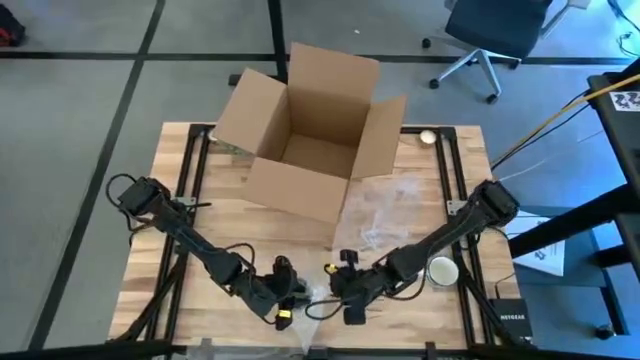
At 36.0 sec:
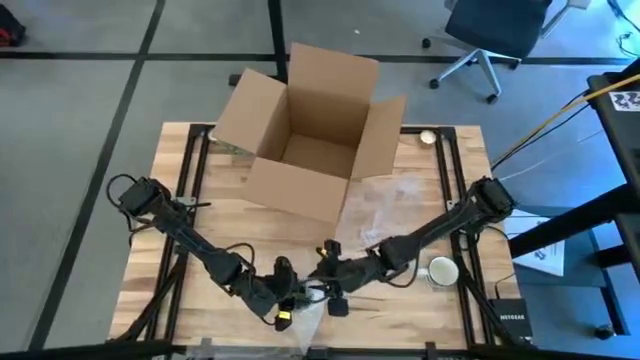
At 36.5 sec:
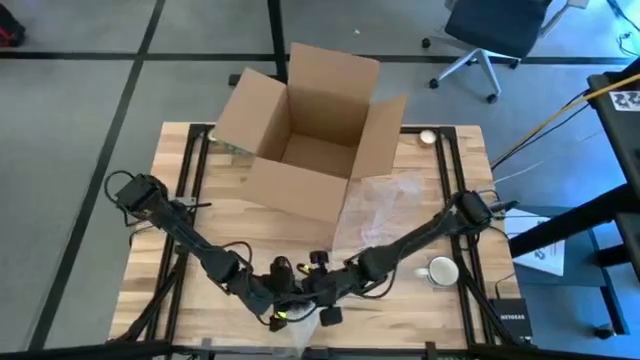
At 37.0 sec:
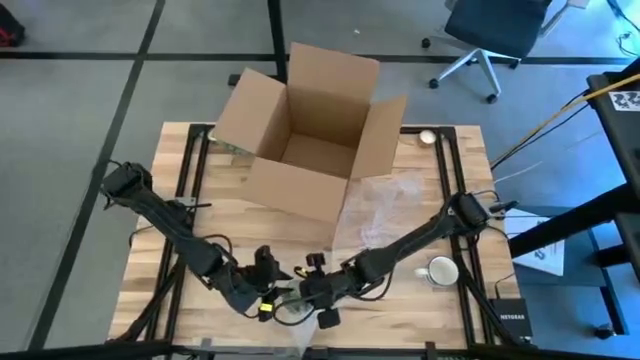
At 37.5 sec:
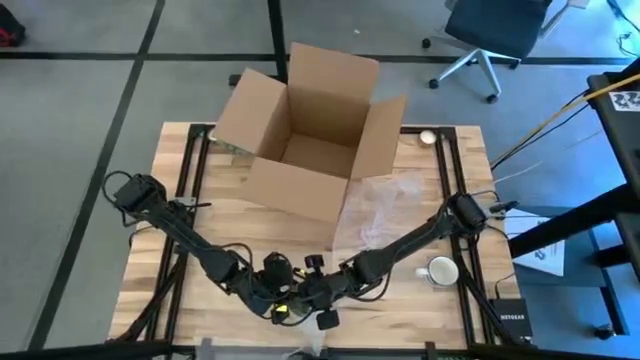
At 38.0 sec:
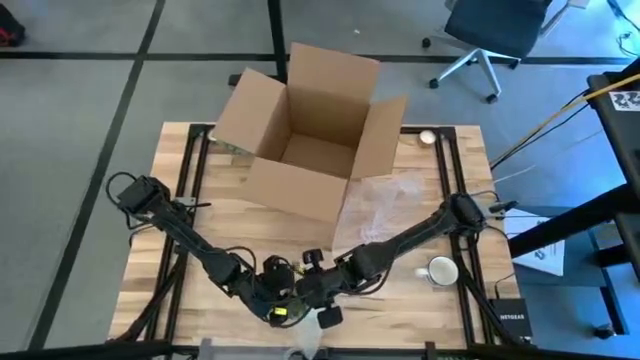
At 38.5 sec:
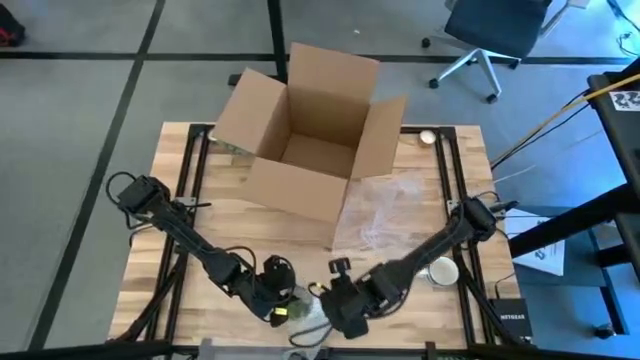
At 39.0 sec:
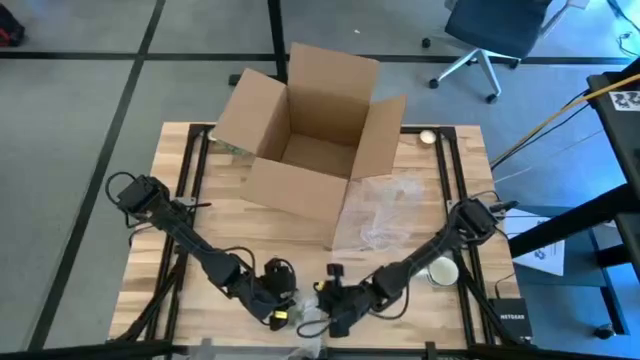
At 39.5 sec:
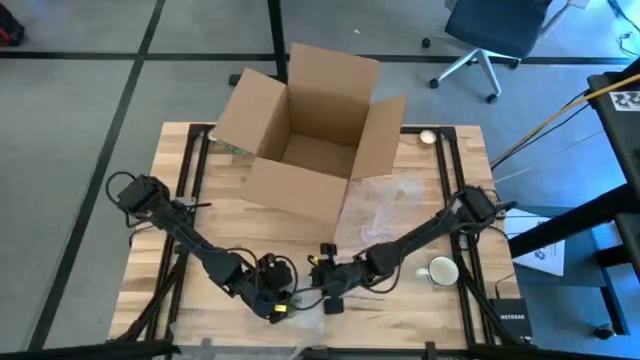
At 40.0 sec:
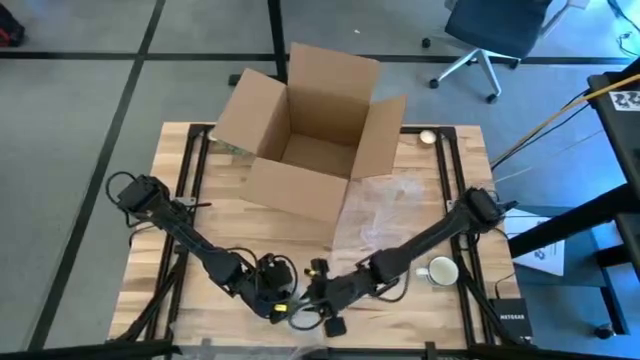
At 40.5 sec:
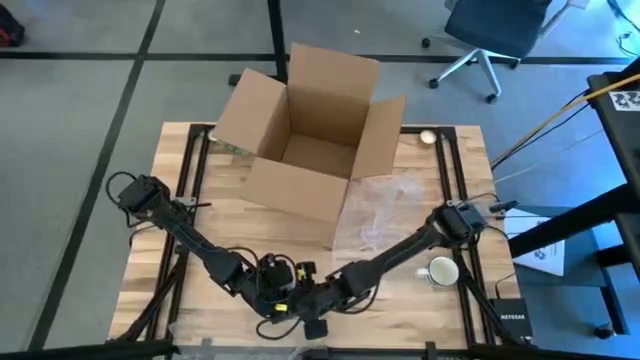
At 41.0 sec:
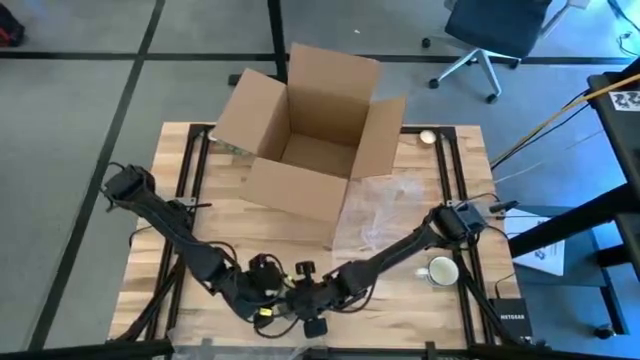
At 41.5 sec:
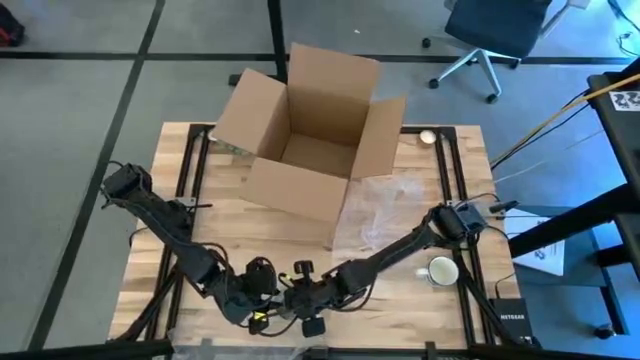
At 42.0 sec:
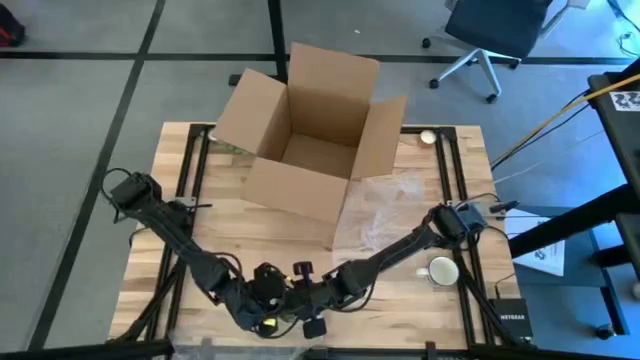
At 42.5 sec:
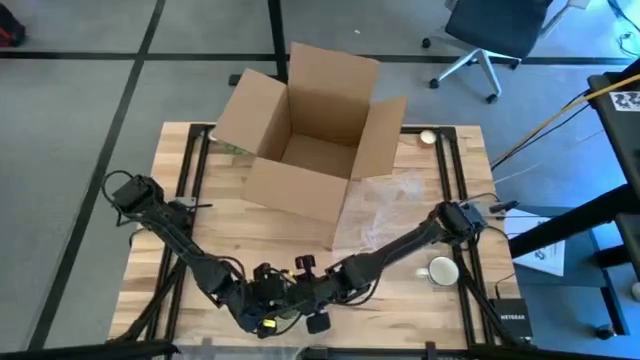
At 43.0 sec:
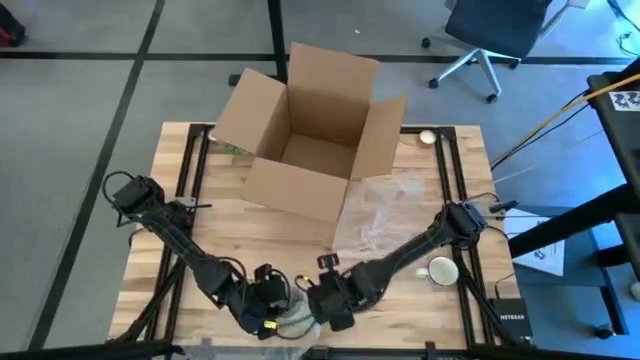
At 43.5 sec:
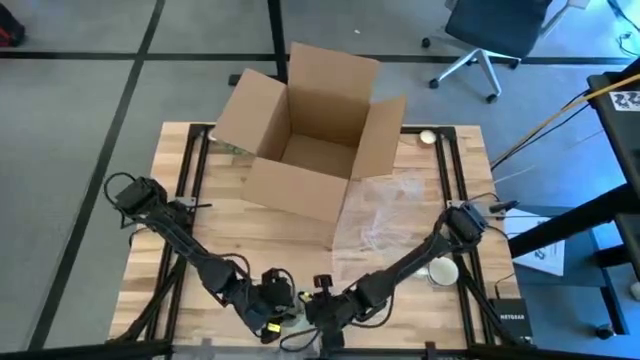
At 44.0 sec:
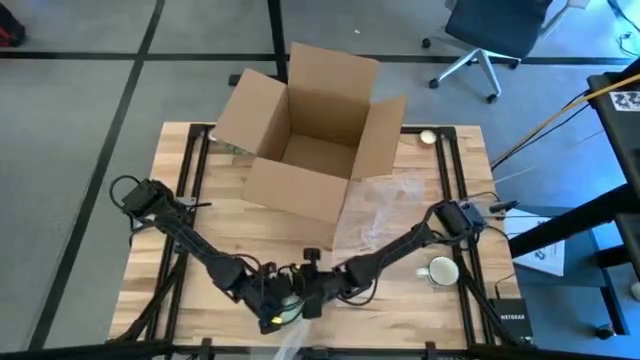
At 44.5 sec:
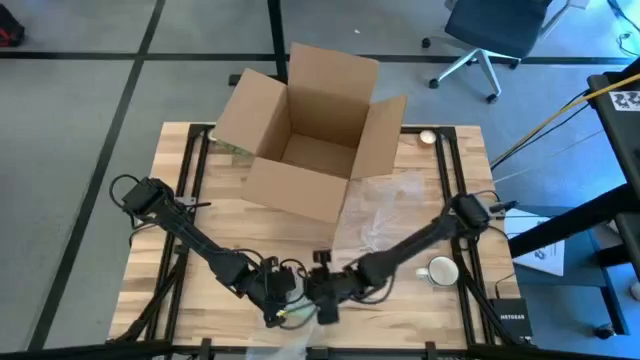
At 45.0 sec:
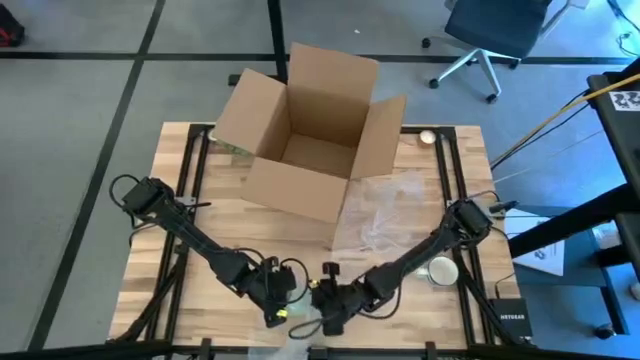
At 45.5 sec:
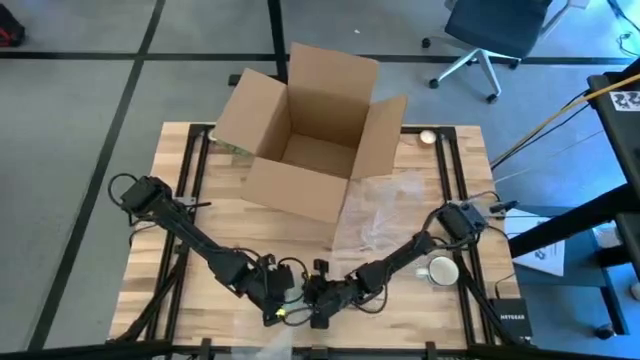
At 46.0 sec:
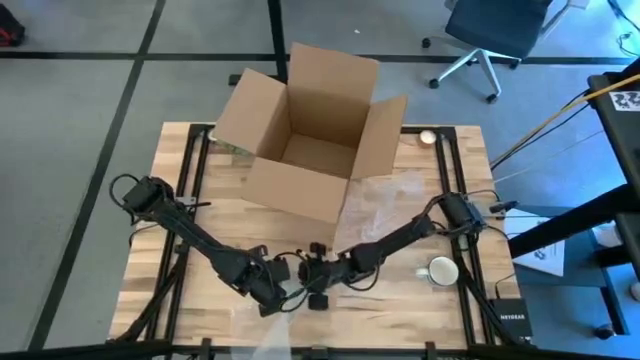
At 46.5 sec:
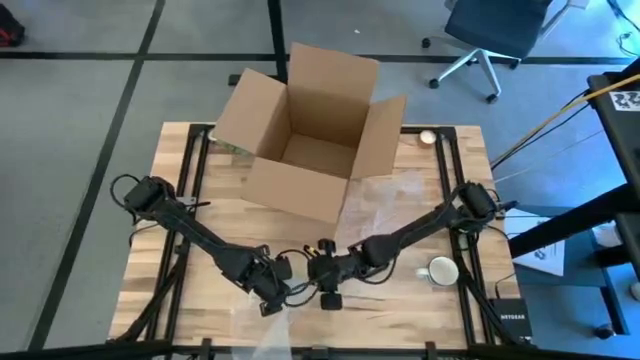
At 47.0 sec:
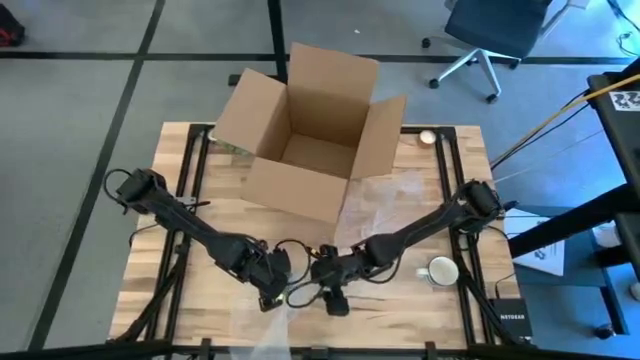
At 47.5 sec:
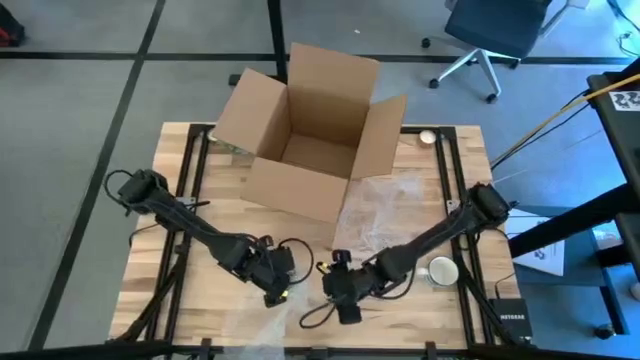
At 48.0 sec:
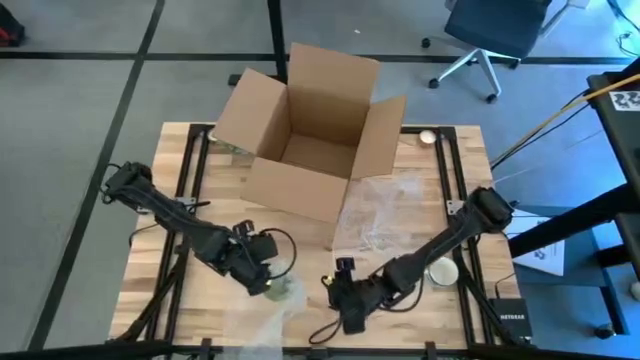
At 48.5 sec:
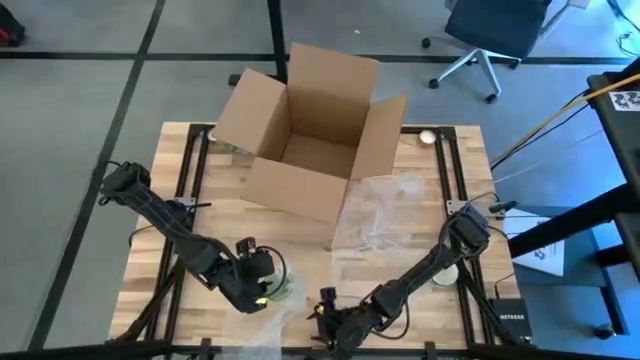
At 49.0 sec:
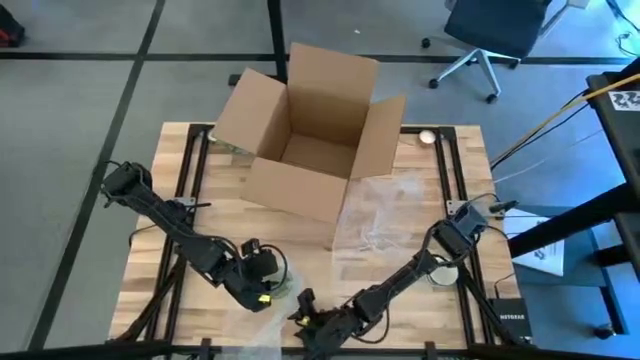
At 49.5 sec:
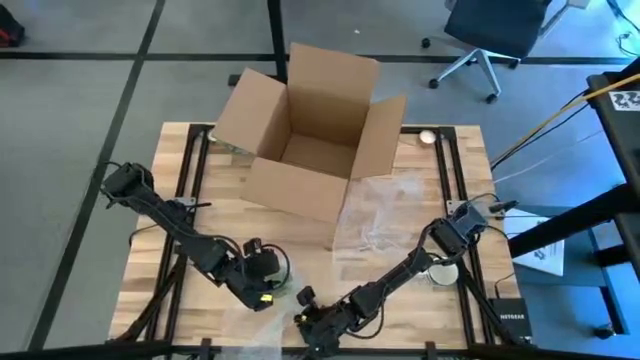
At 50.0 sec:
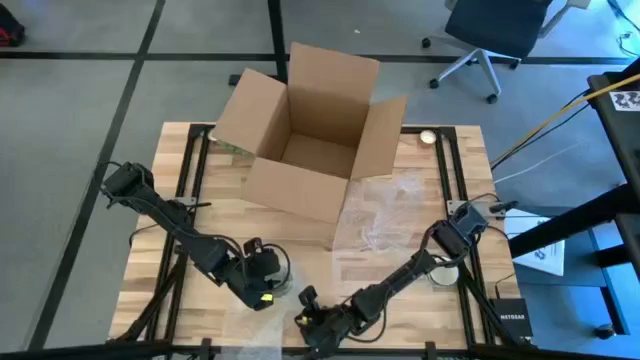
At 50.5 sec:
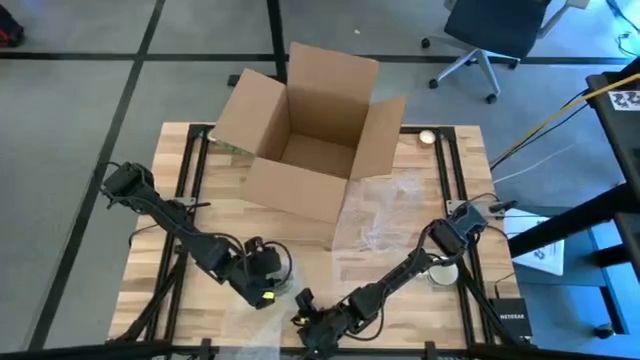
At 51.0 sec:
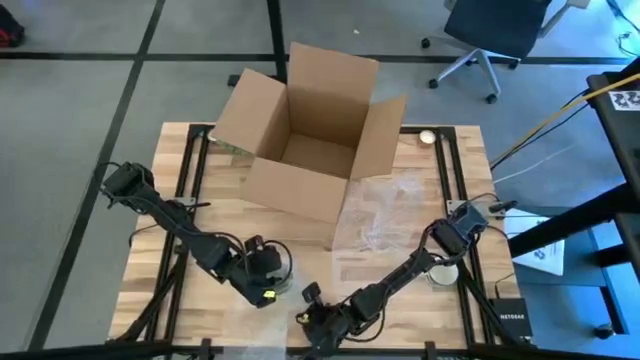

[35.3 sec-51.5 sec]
Task: wrap mug
Wrap the green mug with bubble wrap

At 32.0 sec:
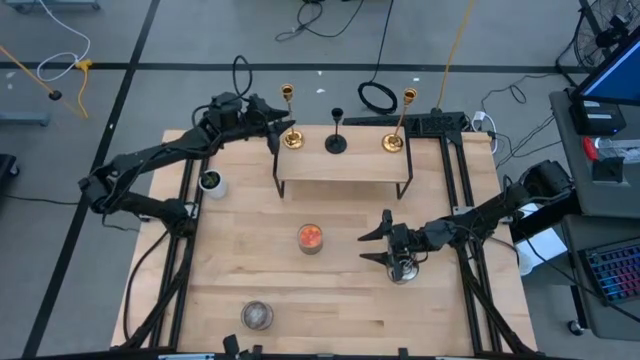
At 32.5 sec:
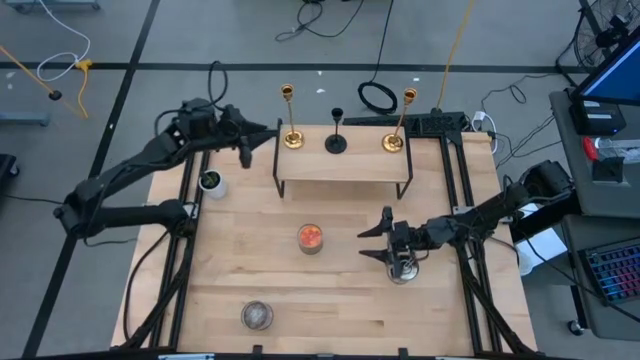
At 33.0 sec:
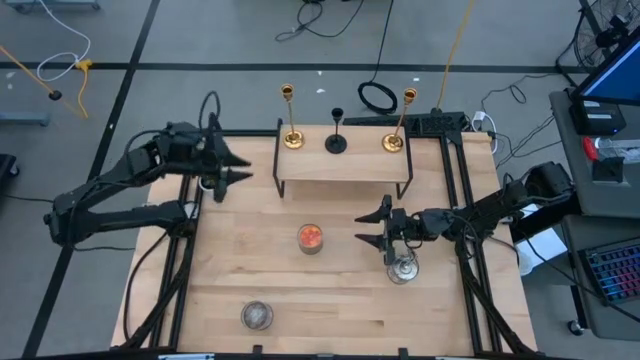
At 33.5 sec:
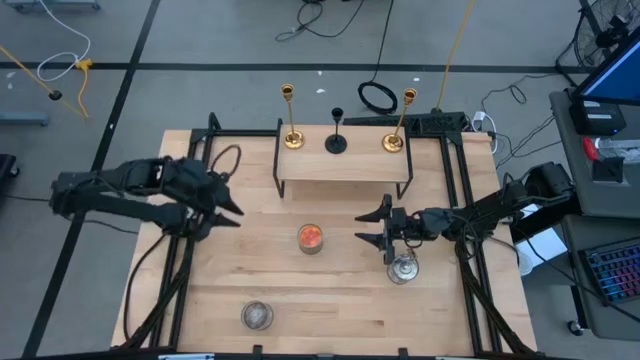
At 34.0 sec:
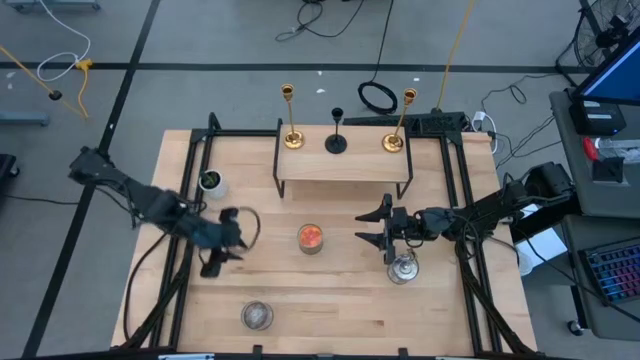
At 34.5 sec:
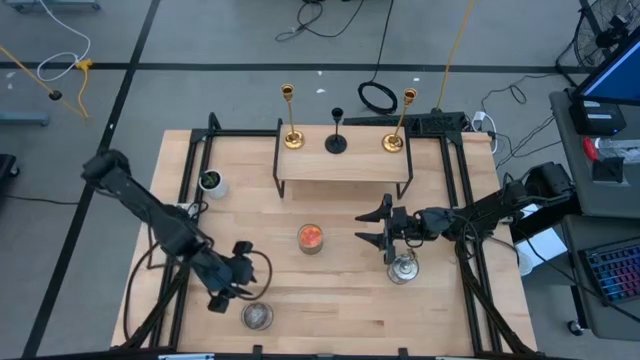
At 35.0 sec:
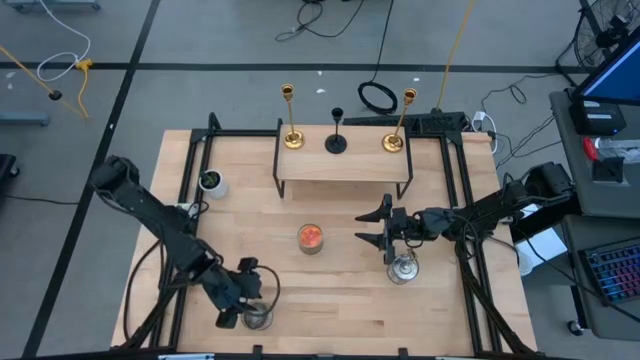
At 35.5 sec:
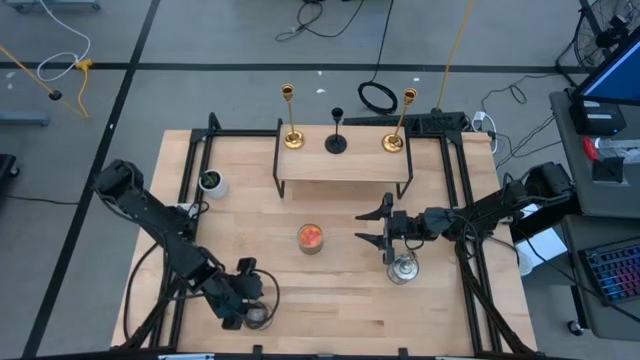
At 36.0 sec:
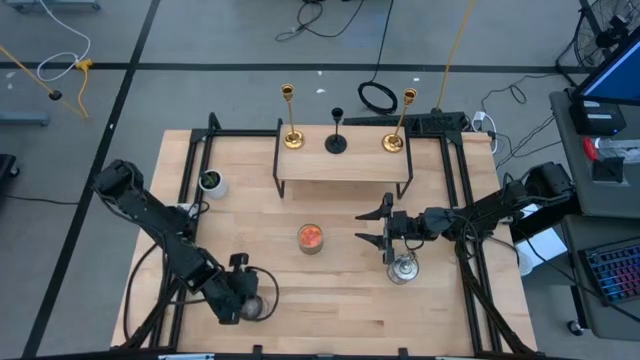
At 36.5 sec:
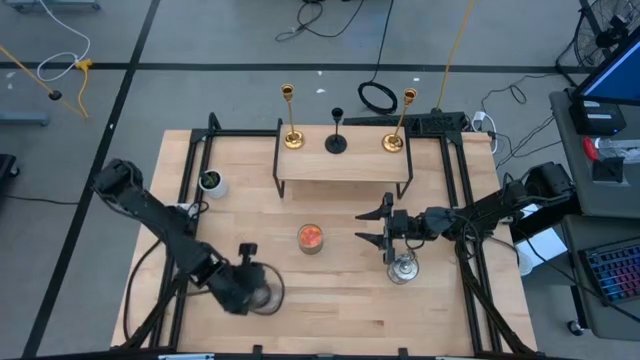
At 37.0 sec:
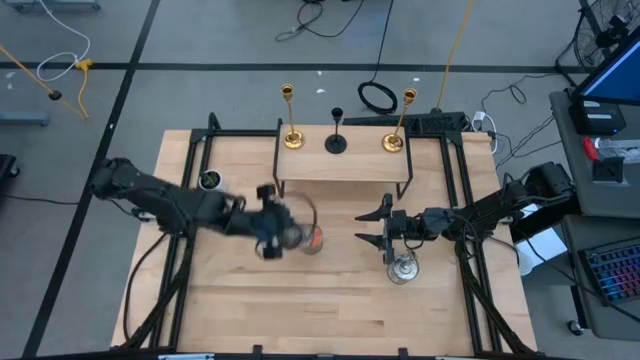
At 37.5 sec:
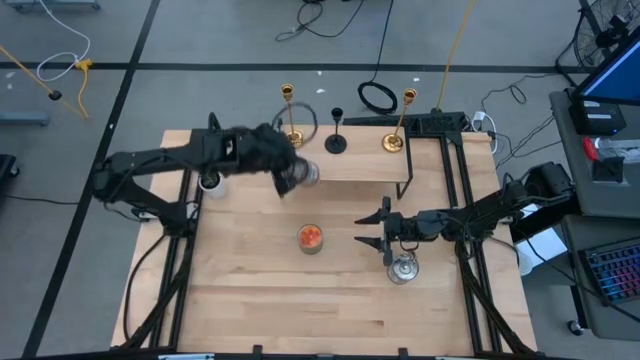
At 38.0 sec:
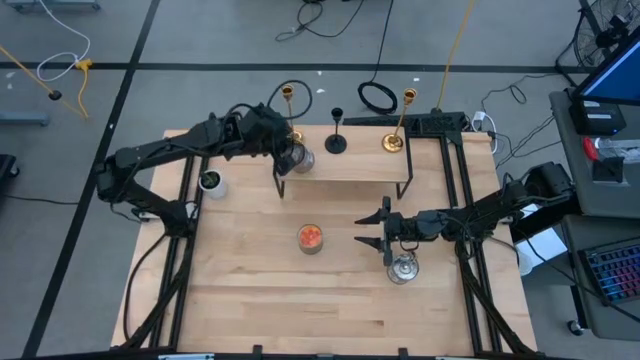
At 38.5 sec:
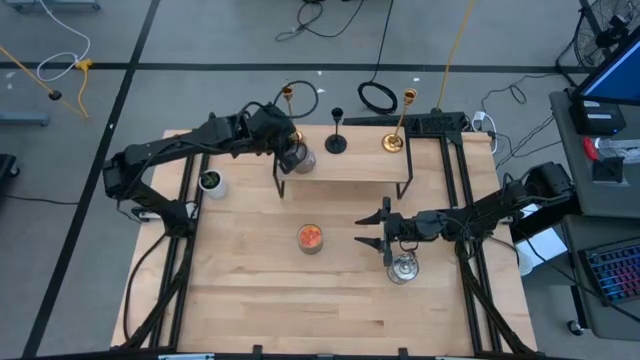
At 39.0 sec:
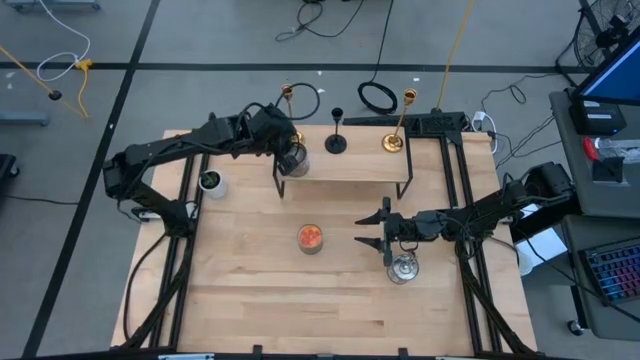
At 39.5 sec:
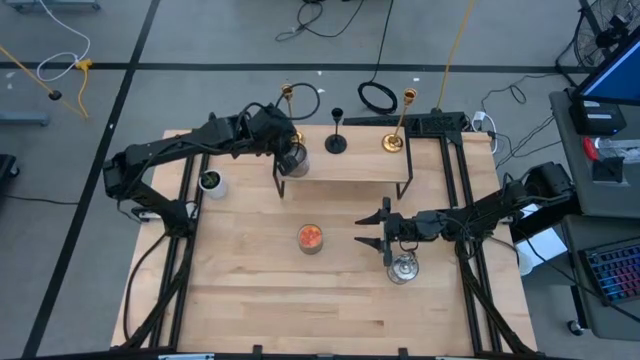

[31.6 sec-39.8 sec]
Task: Pick & Place candle stick holders
Put the brown scented candle aligned with the golden candle holder on the shelf
